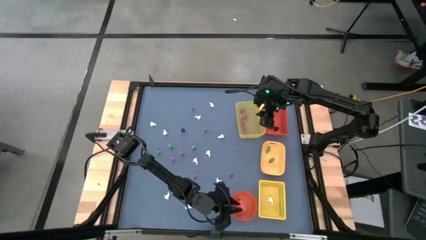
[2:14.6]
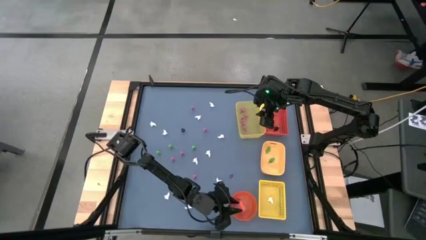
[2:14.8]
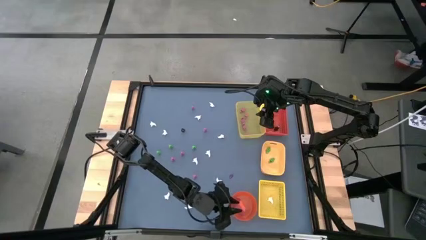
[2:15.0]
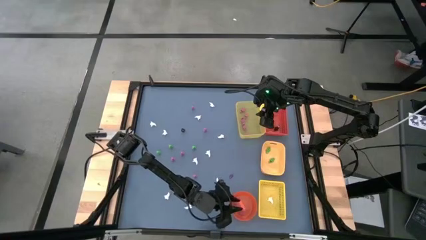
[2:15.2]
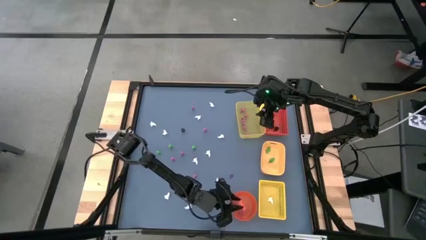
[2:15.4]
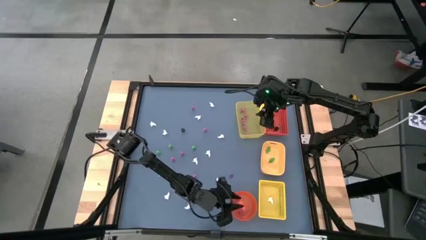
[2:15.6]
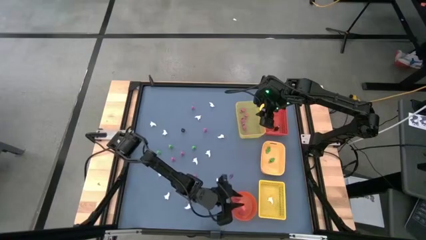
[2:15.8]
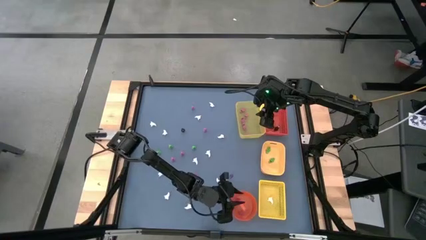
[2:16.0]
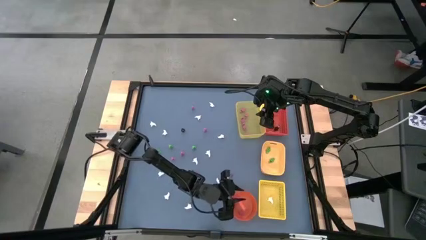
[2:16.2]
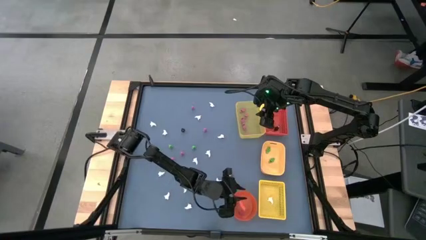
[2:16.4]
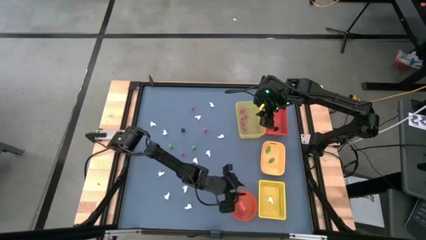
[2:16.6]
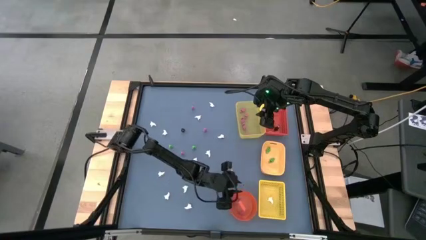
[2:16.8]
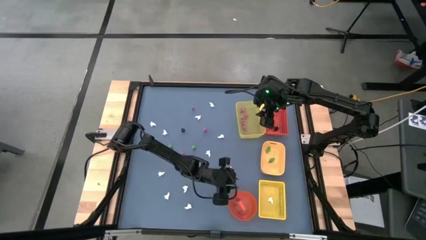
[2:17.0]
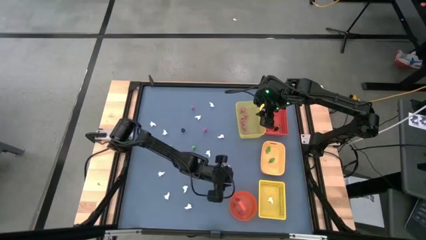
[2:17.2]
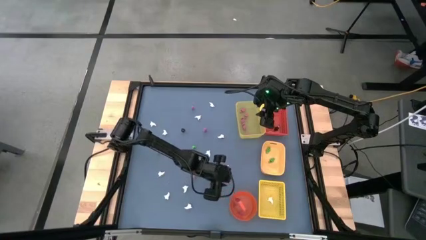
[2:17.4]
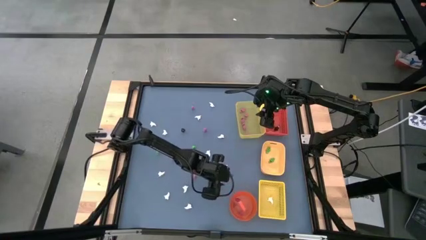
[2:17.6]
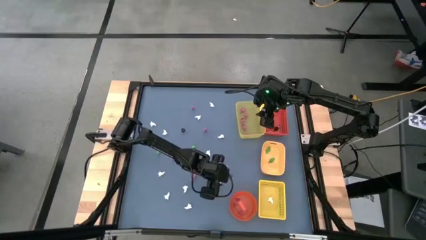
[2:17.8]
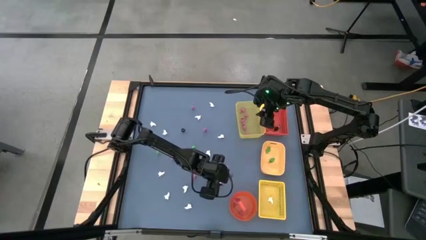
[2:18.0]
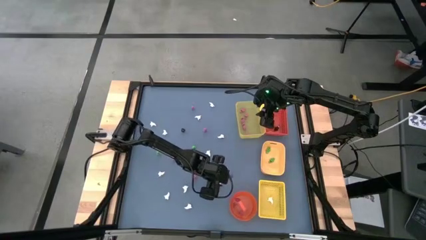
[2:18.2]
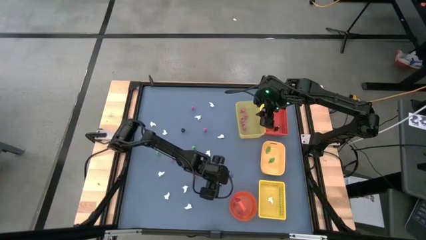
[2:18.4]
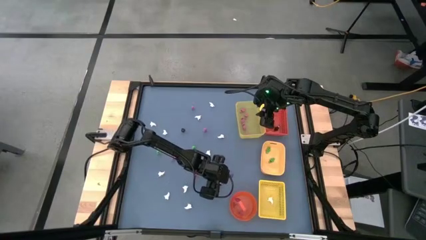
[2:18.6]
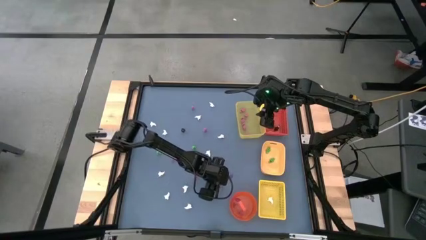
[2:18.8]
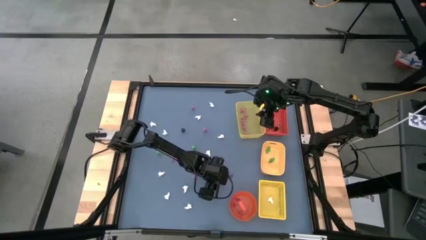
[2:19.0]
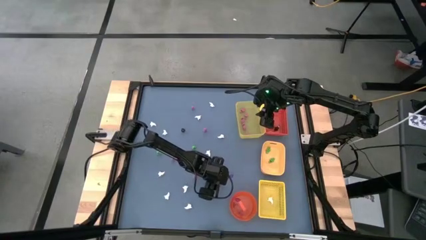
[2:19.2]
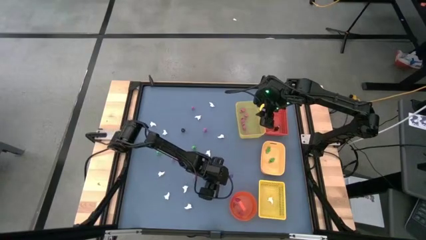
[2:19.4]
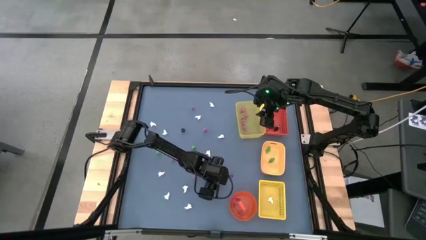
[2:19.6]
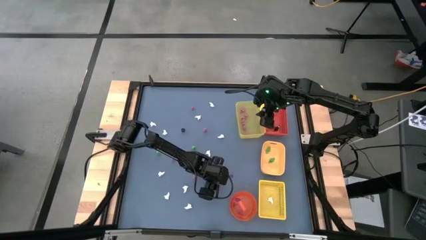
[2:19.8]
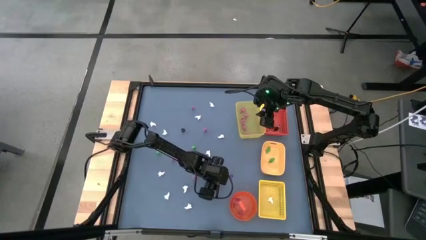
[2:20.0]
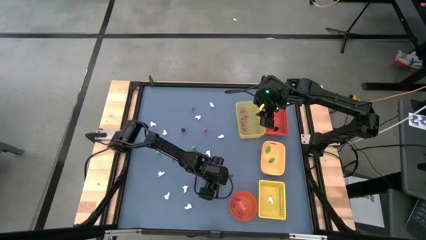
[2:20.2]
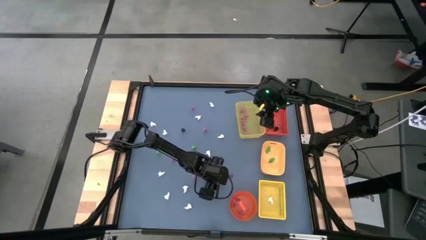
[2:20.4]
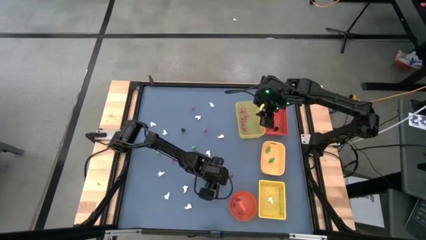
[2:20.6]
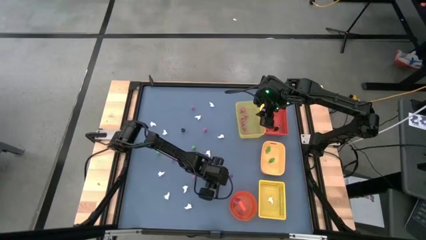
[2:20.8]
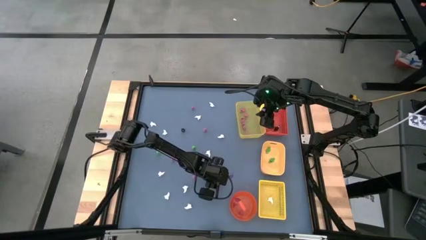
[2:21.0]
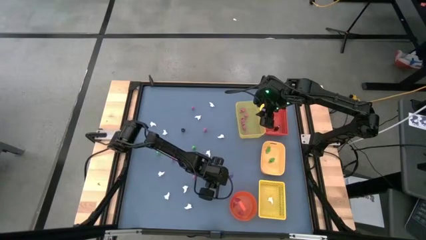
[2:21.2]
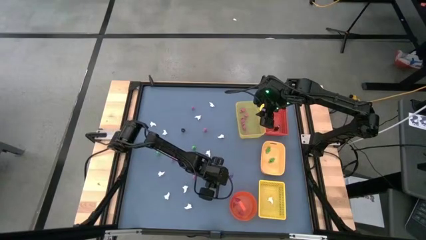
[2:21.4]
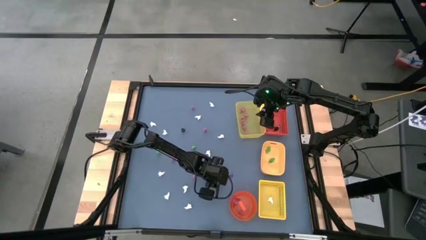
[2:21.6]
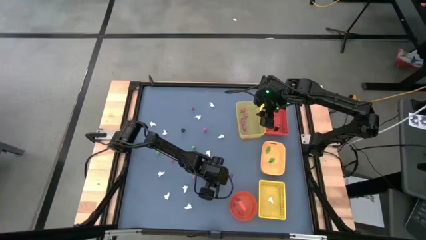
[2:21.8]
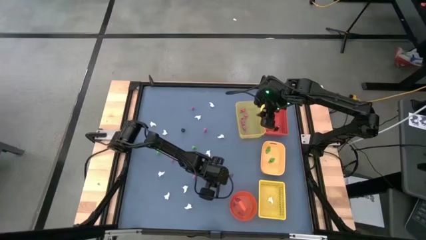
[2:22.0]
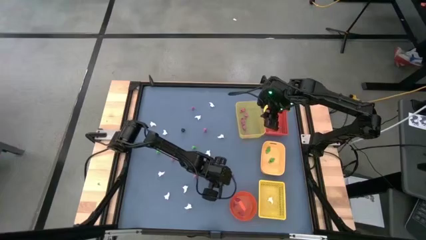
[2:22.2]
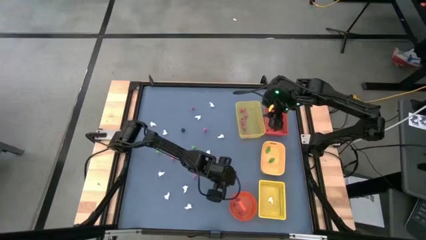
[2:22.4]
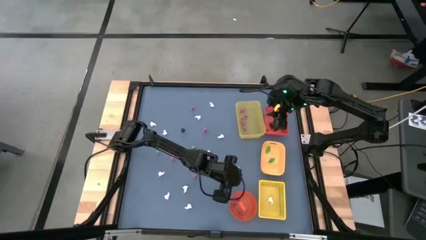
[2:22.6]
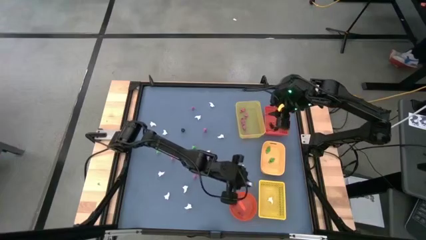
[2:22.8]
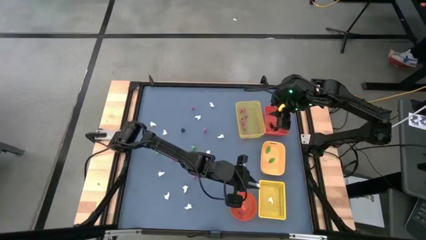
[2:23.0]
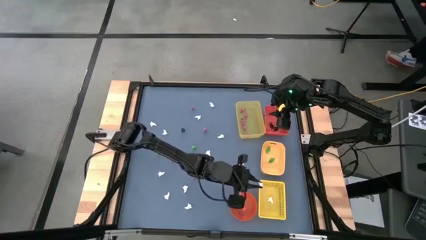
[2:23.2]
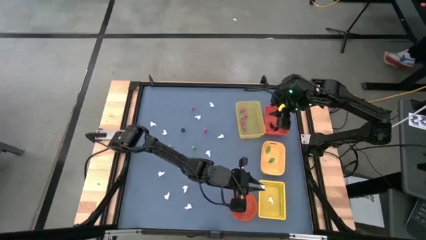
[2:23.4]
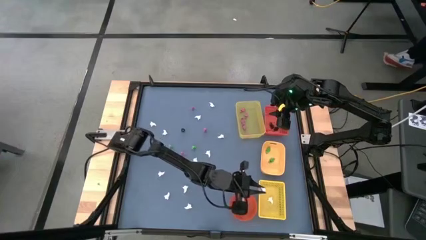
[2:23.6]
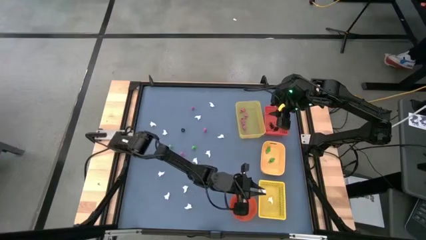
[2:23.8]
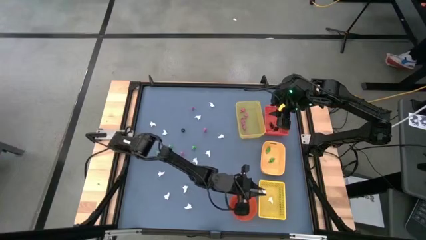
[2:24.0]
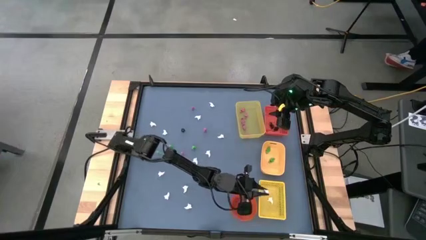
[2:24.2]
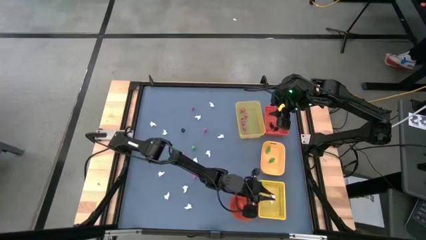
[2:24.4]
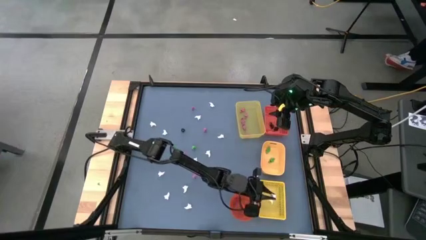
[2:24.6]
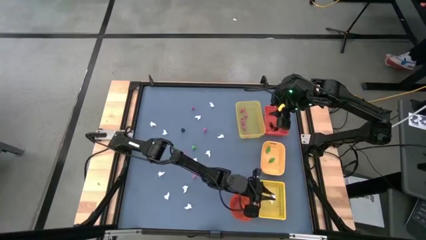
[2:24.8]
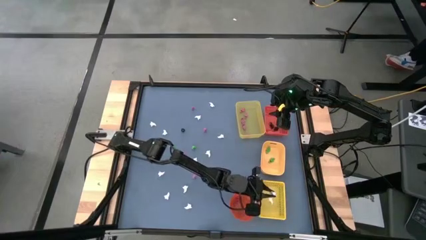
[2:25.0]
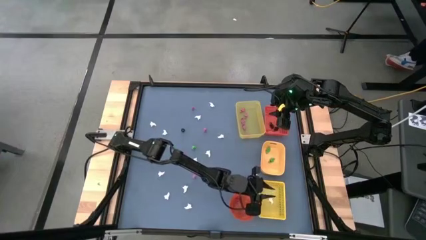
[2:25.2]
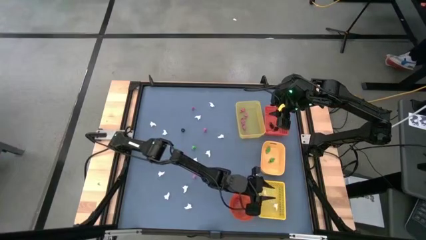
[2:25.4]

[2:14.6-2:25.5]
Task: Sort Halloween decoration
Put the white ghost toy into the yellow box

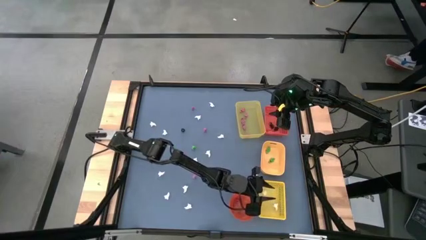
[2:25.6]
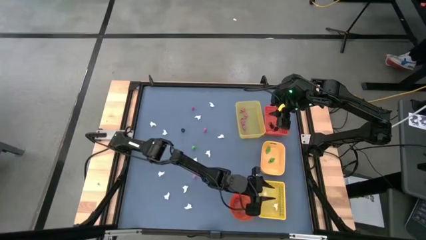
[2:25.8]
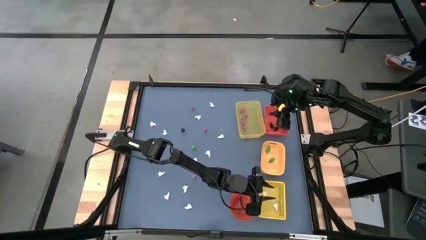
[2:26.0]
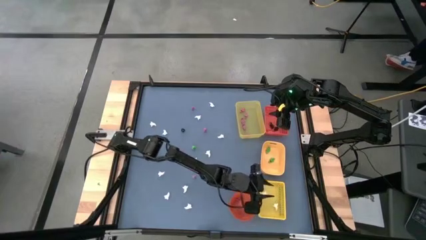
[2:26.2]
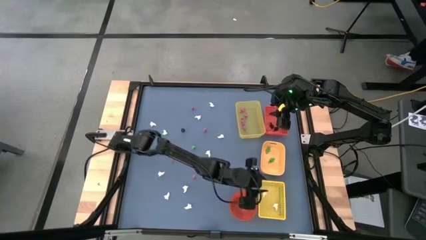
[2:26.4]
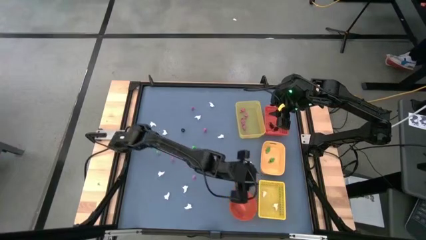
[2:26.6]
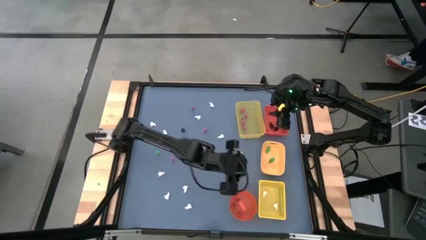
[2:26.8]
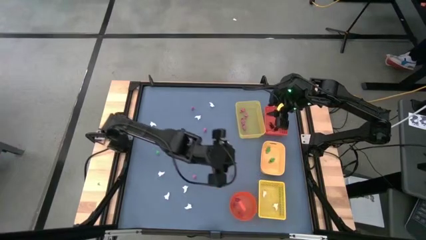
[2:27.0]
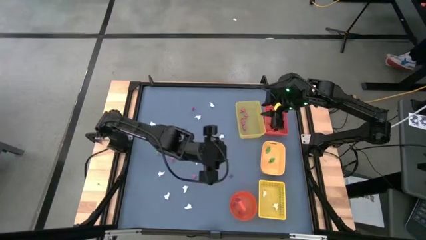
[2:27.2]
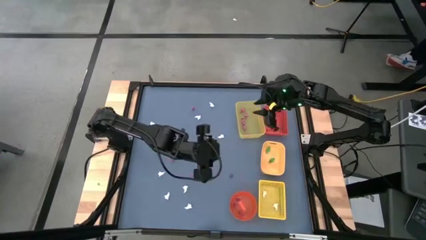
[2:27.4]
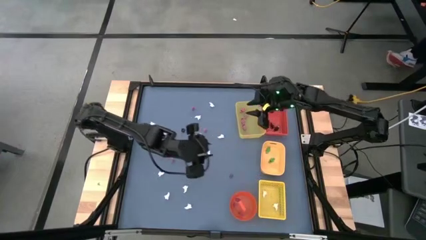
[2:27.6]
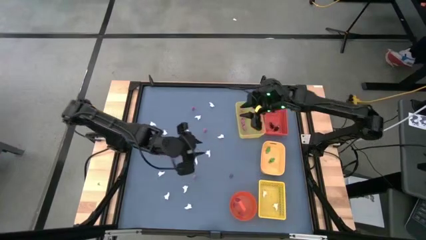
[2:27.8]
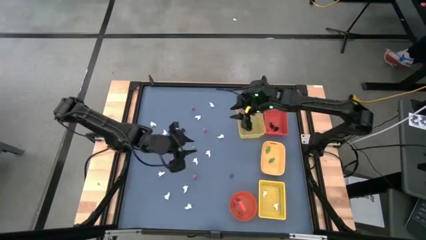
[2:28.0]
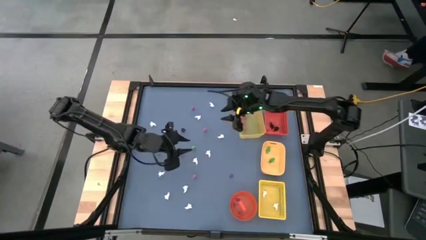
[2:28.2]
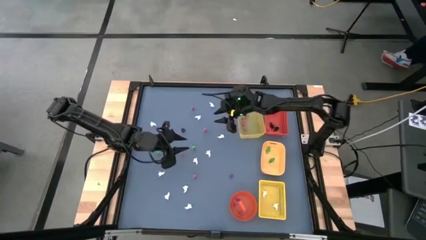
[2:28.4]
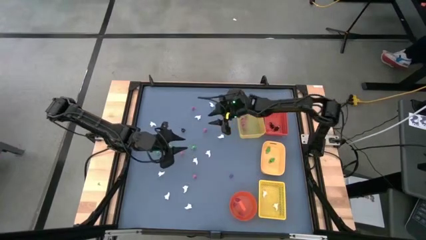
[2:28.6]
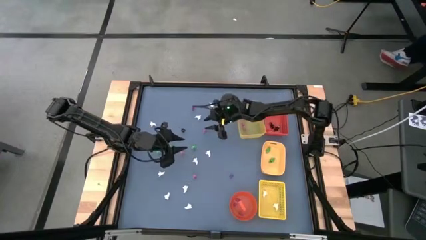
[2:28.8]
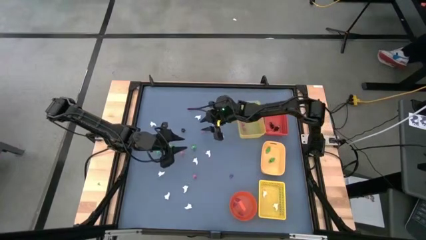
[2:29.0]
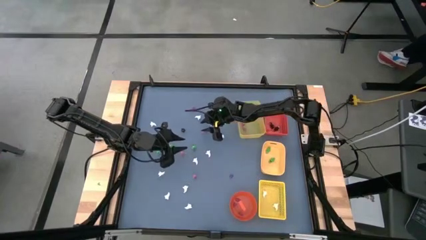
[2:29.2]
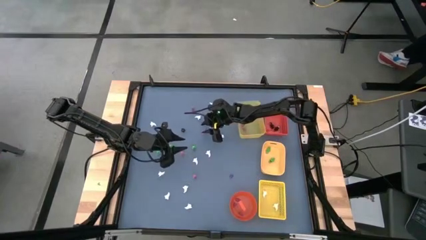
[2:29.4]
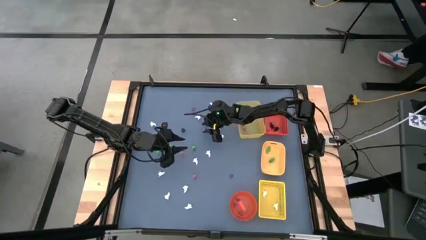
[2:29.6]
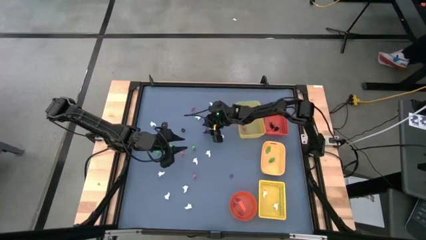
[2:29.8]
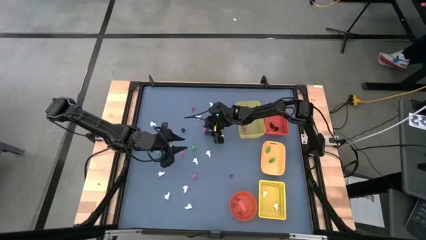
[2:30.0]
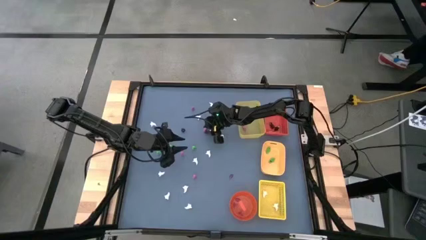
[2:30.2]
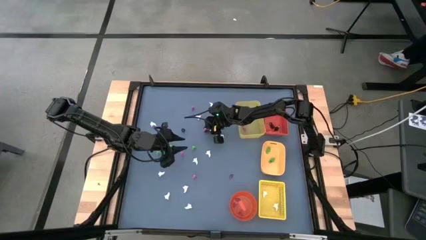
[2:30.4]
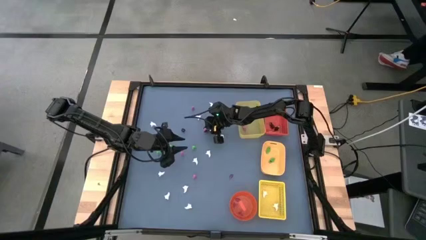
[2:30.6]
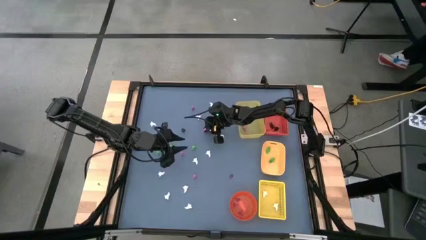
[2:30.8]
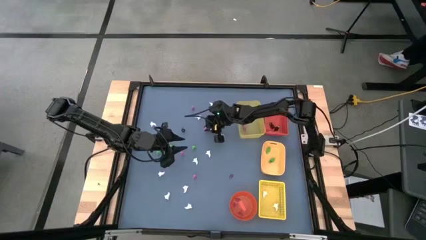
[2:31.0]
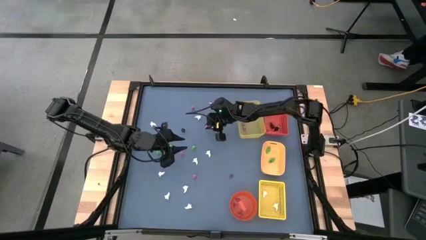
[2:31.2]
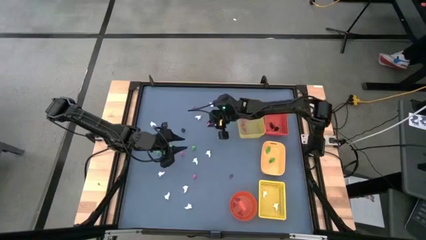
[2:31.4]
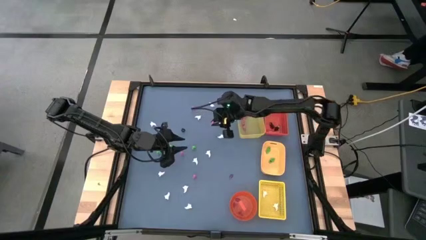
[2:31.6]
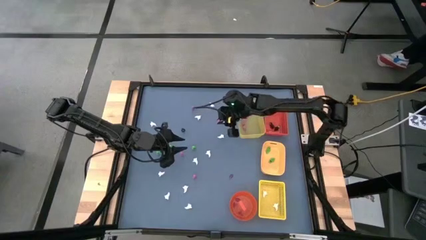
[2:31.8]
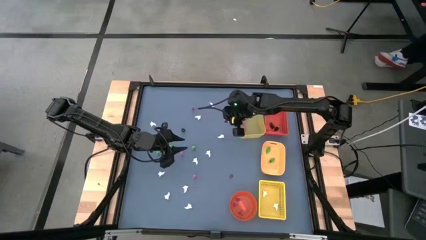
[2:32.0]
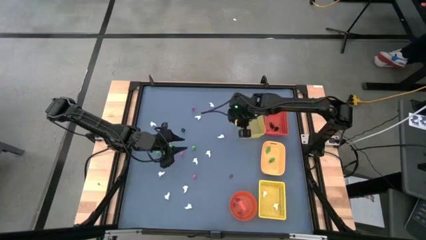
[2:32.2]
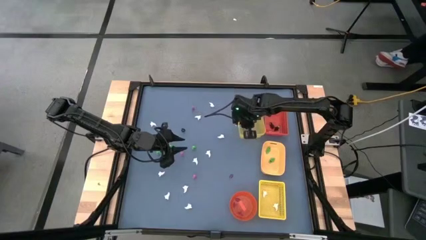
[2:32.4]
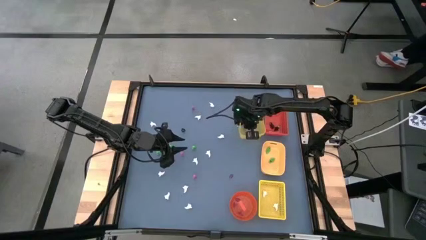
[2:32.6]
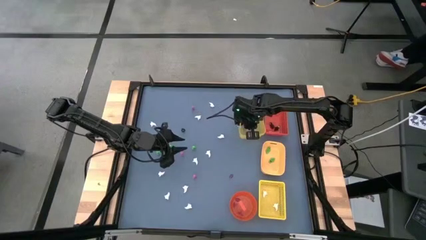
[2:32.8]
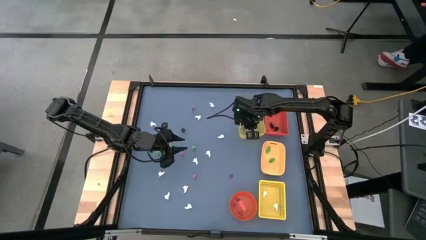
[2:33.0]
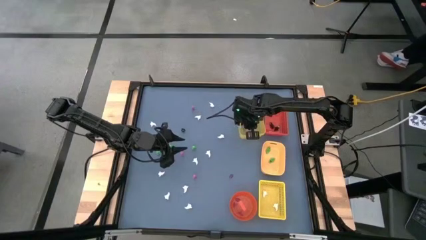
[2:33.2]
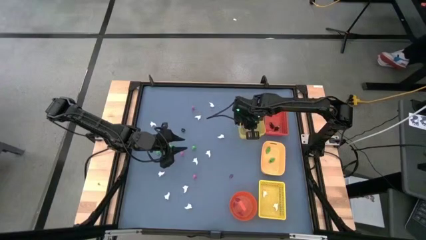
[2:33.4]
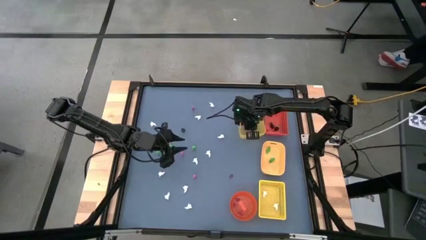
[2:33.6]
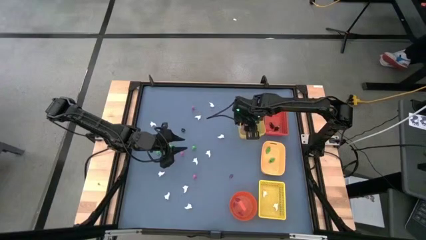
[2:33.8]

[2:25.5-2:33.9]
Put the pink skeleton toy into the top yellow bin
